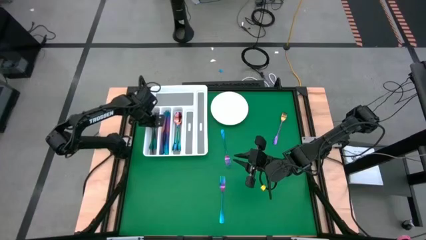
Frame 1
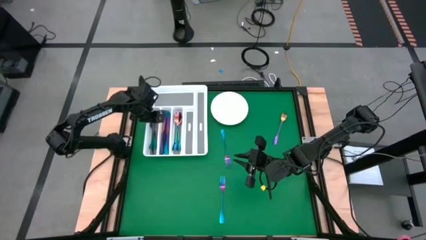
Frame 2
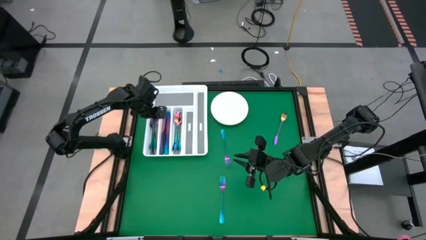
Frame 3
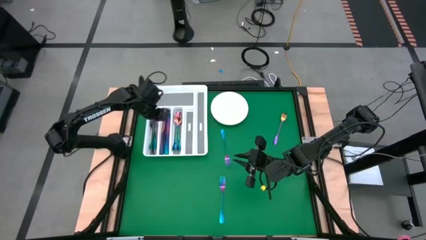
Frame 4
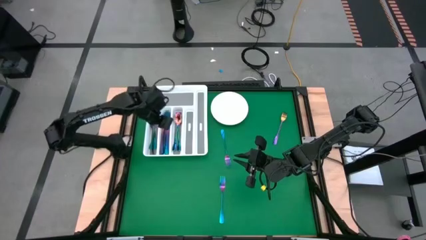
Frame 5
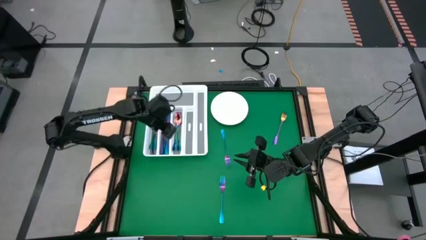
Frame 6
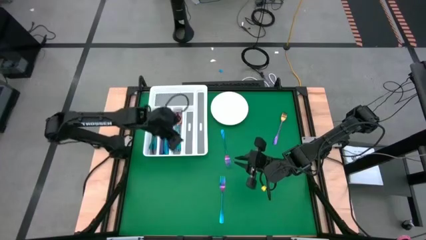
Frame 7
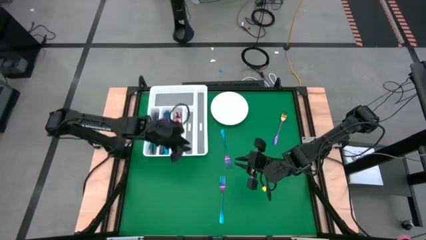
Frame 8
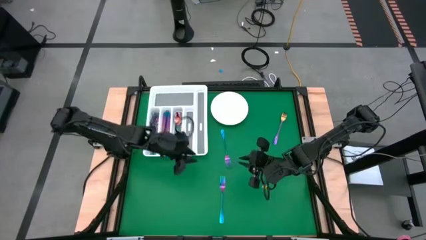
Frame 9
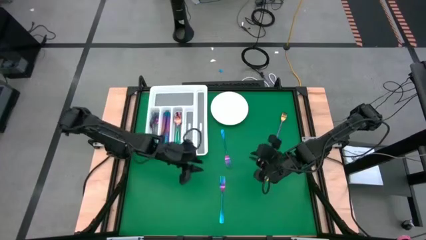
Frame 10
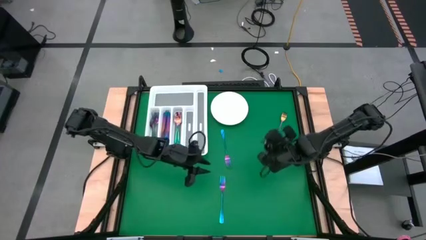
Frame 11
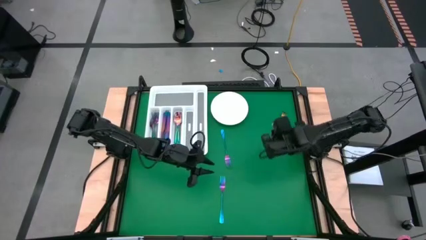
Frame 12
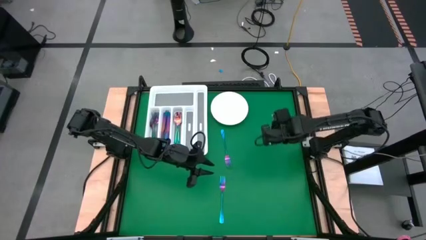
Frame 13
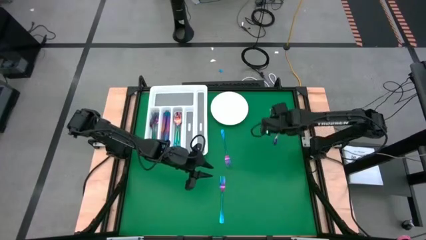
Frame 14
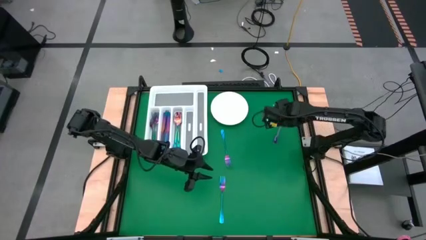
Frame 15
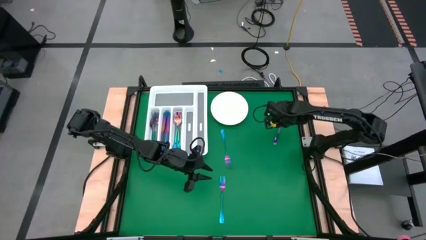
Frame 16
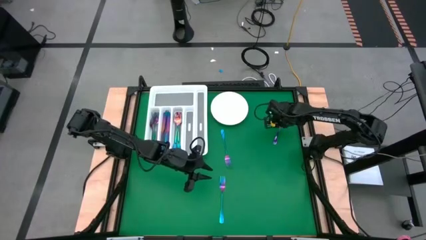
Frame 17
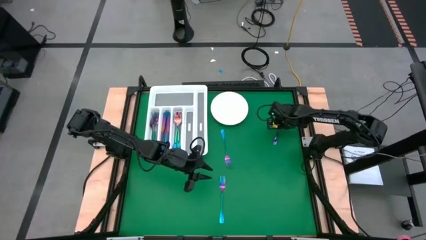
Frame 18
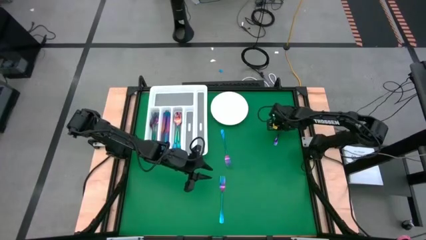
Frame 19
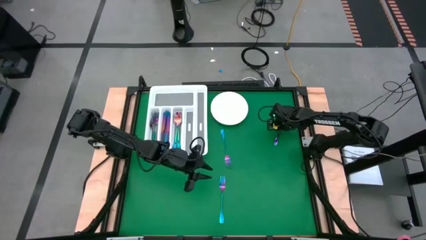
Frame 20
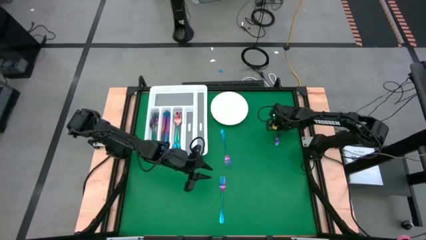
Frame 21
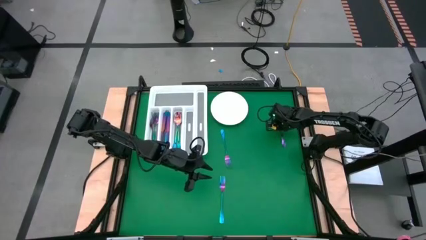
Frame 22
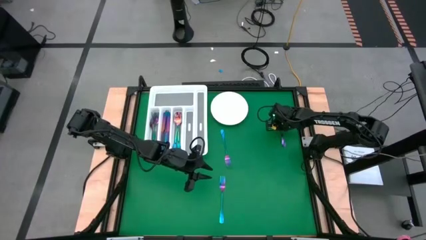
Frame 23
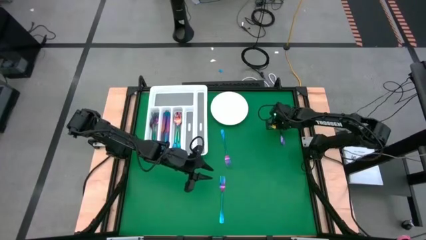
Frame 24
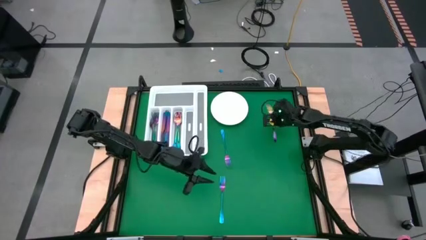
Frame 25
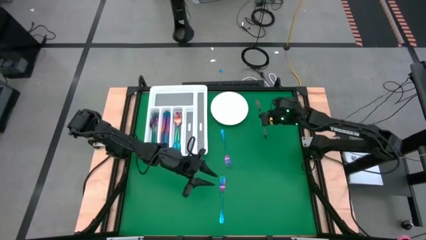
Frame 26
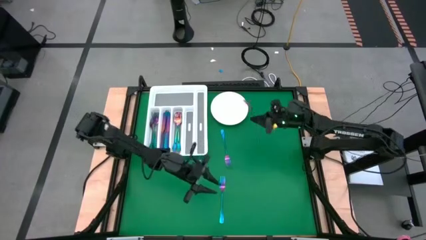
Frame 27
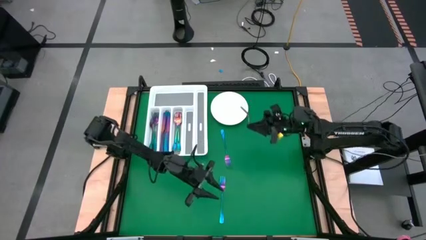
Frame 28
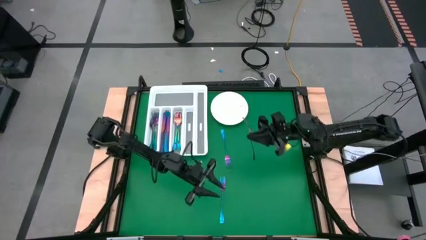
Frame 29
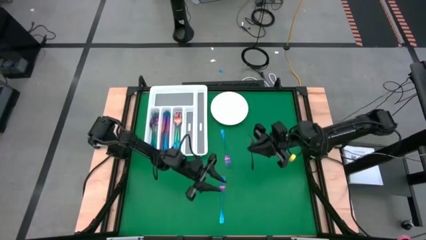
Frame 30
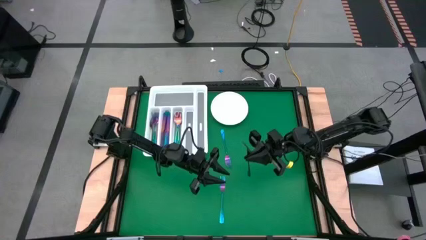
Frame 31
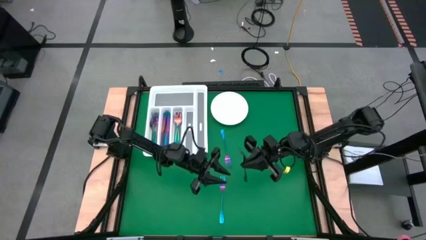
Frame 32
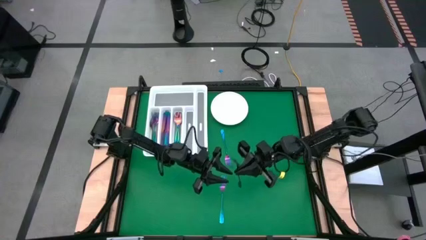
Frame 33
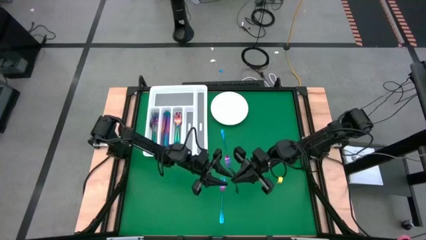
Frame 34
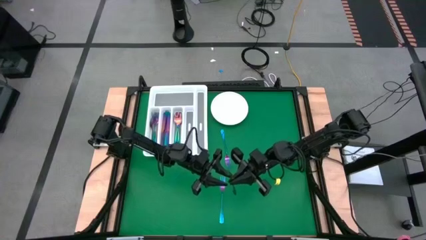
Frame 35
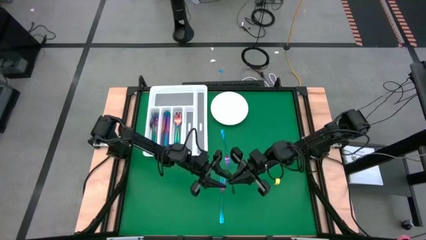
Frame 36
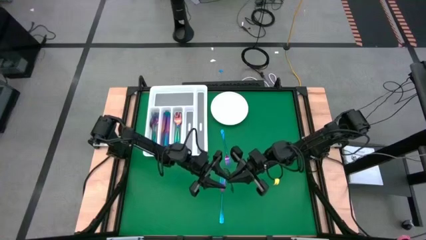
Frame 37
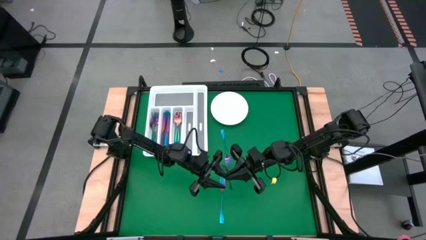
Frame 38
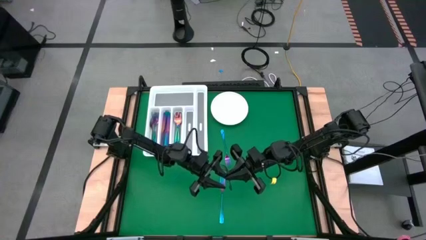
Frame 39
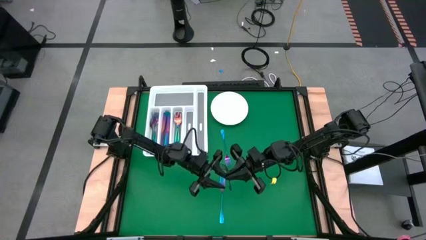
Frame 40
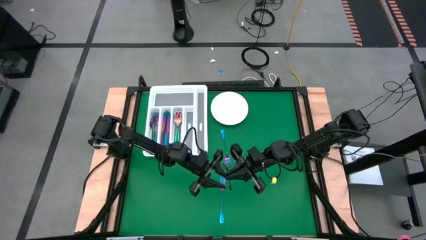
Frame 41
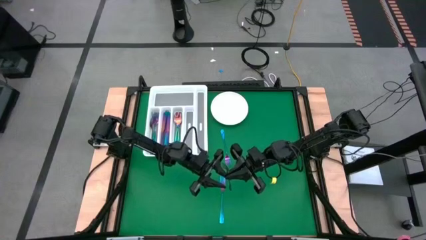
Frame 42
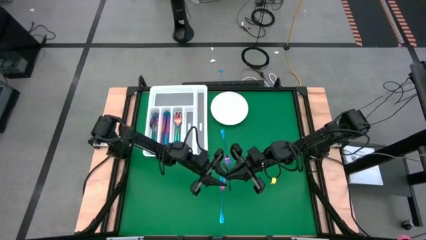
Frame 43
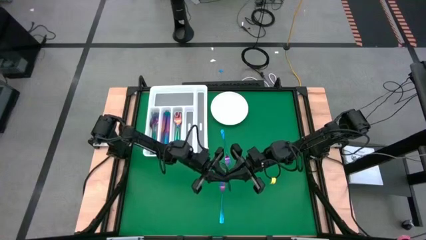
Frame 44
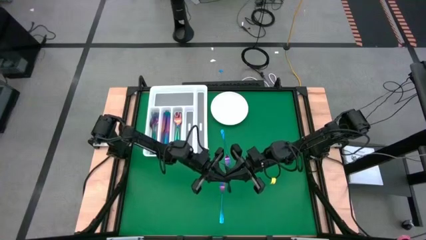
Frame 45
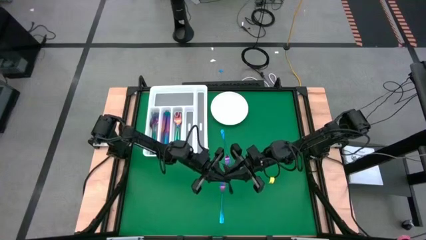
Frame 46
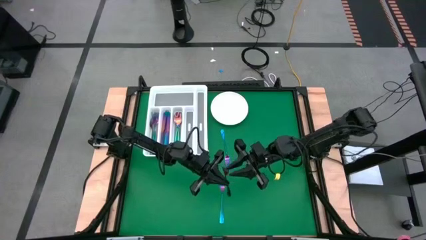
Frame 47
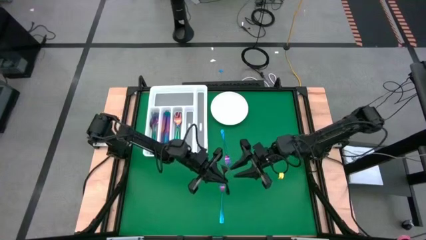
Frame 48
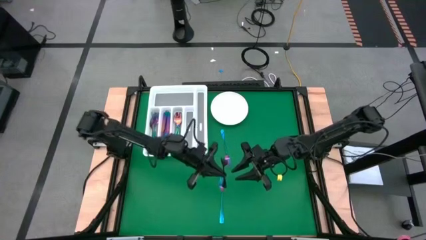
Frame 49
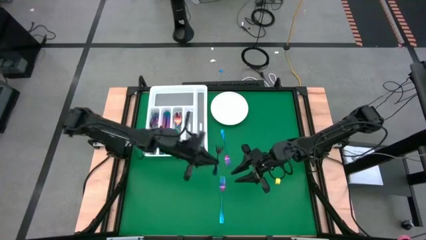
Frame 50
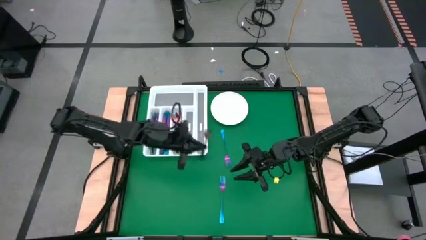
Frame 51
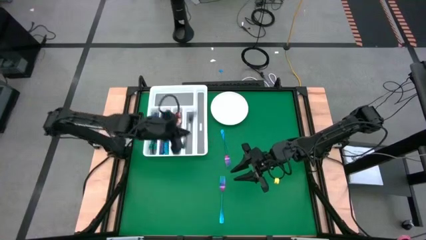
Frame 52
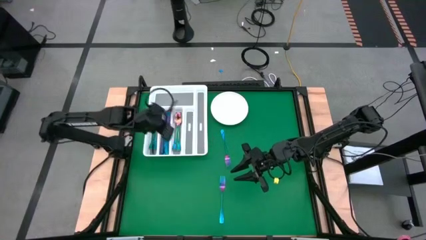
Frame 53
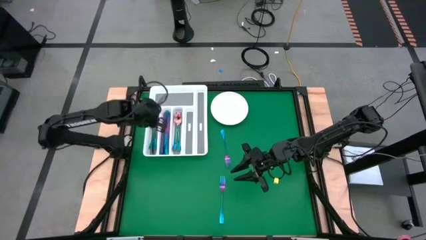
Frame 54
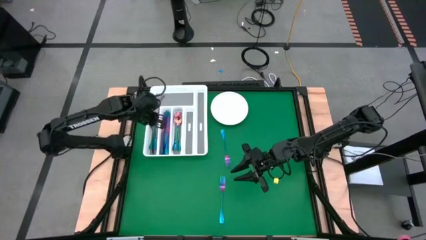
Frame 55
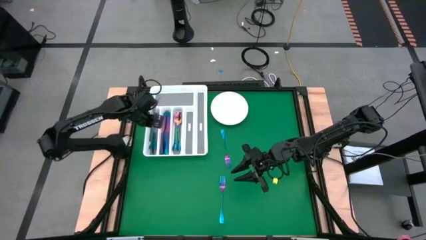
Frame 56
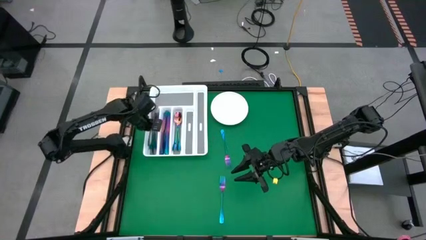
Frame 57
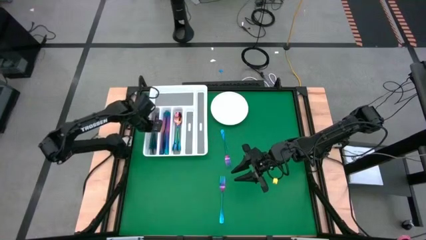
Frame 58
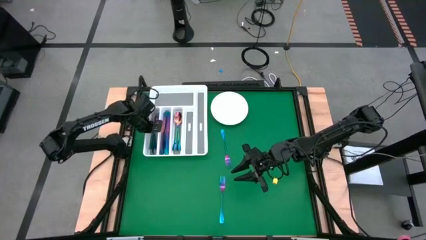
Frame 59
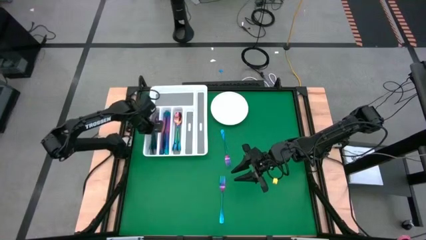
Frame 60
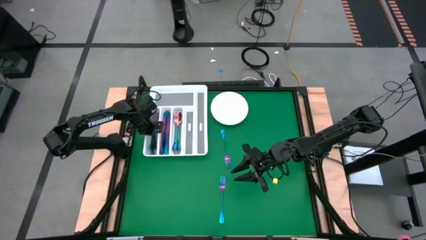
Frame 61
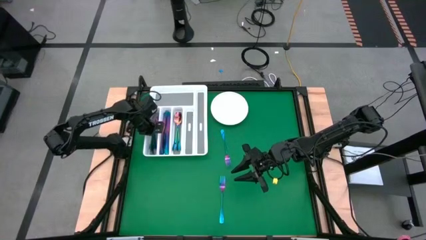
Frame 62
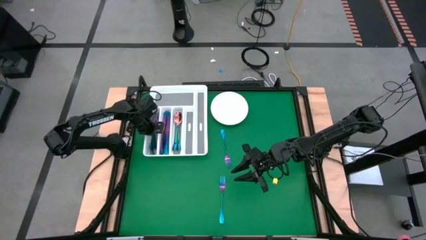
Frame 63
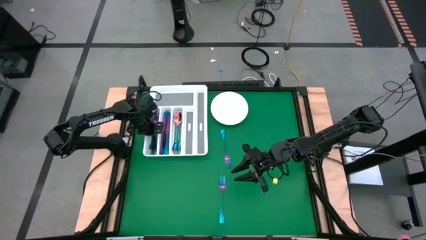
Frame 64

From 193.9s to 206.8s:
Task: Sort silverware
Put the blue fork into the silverware tray

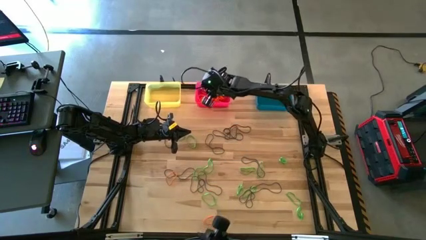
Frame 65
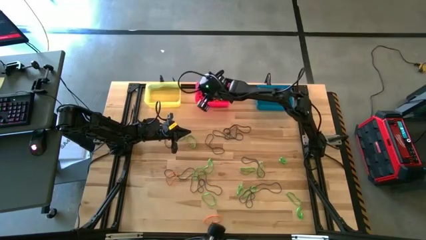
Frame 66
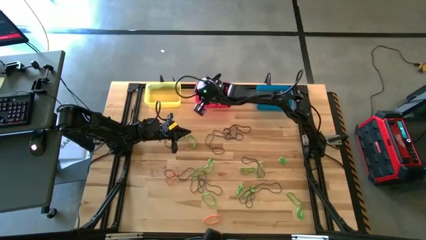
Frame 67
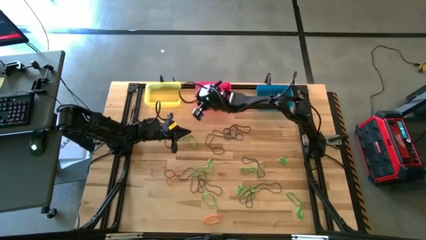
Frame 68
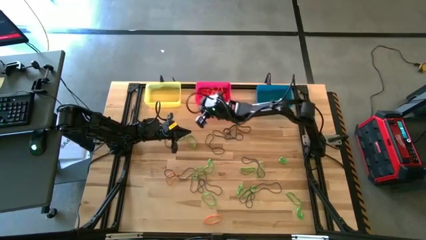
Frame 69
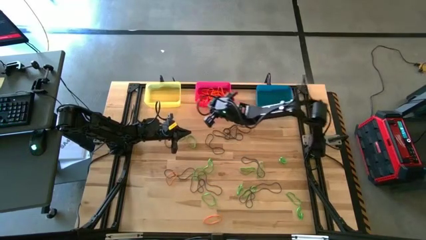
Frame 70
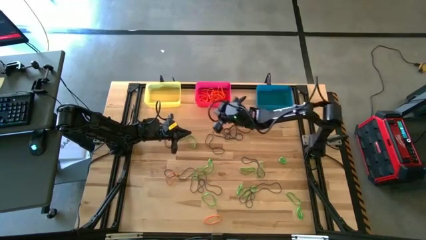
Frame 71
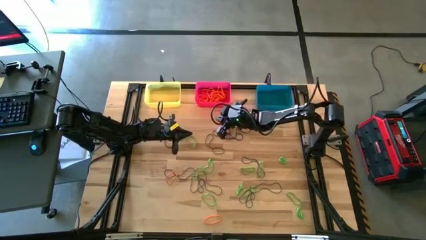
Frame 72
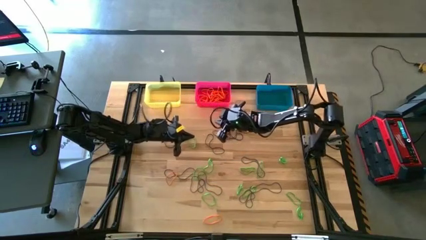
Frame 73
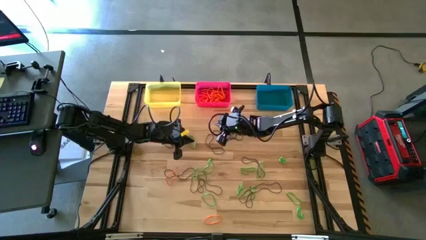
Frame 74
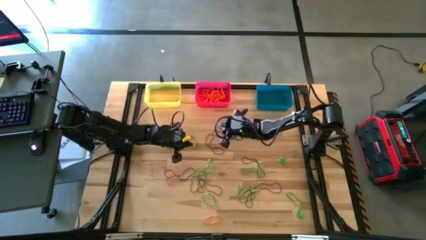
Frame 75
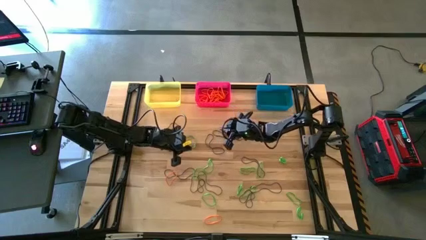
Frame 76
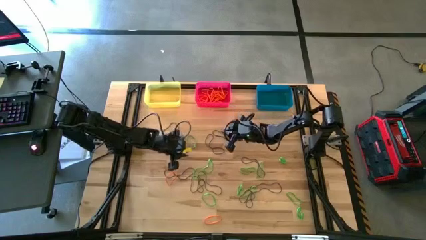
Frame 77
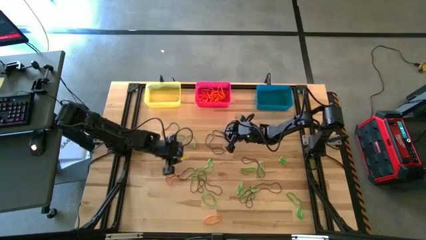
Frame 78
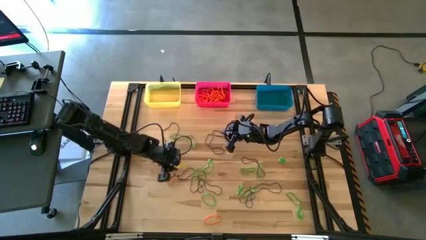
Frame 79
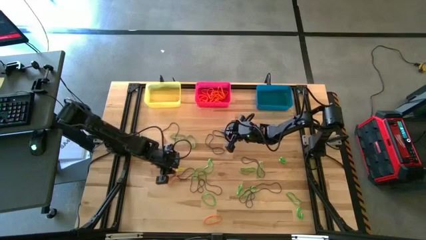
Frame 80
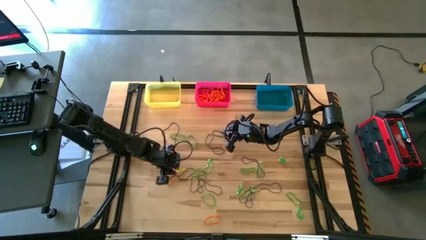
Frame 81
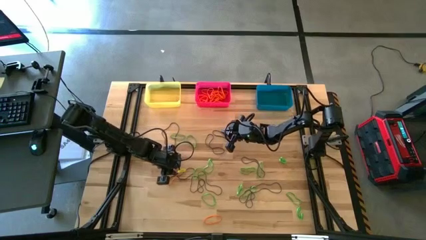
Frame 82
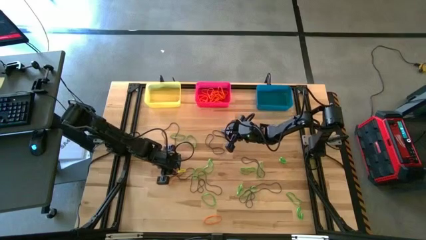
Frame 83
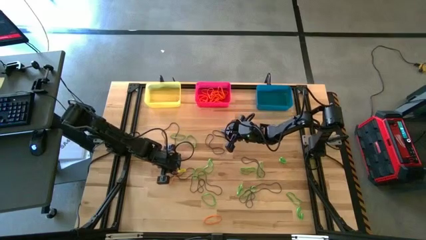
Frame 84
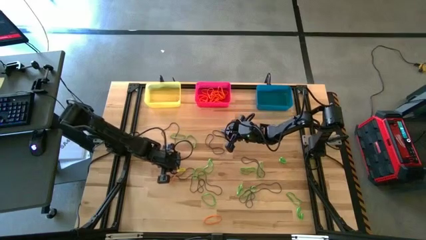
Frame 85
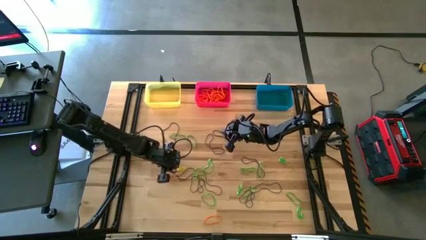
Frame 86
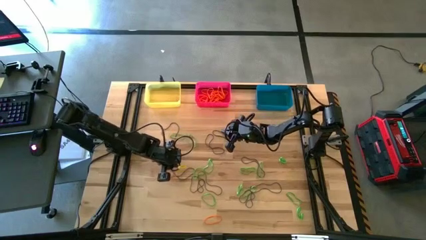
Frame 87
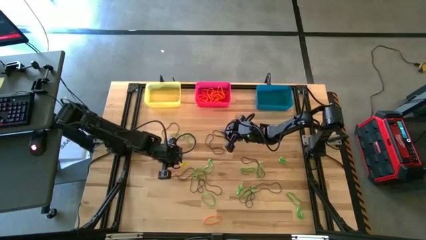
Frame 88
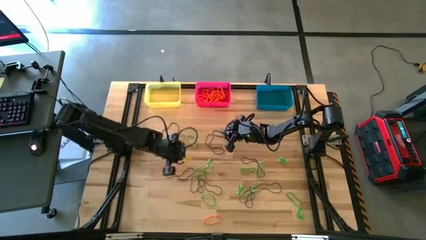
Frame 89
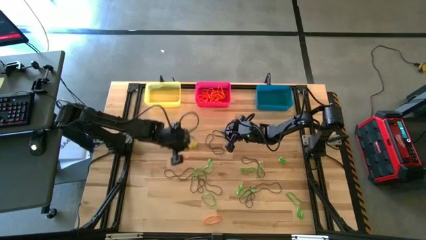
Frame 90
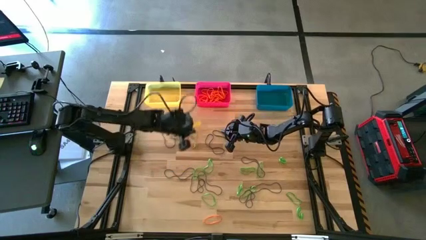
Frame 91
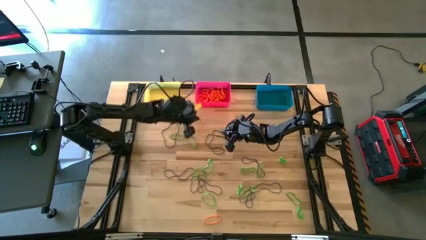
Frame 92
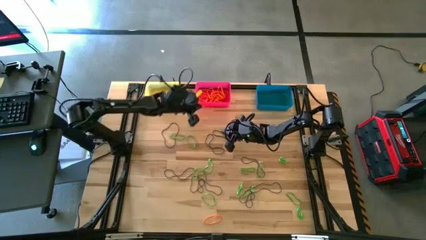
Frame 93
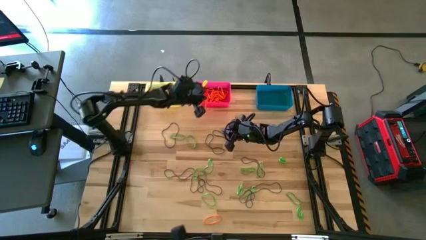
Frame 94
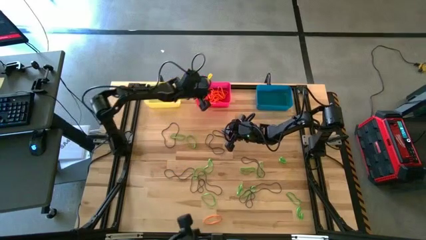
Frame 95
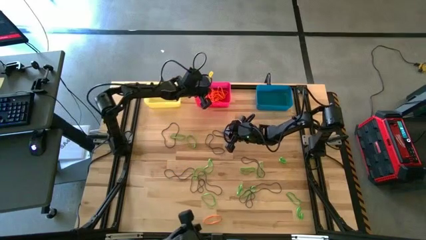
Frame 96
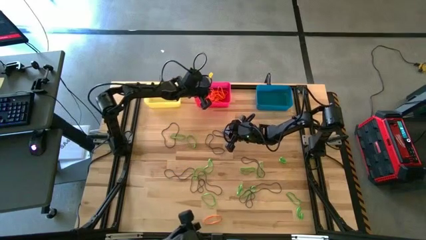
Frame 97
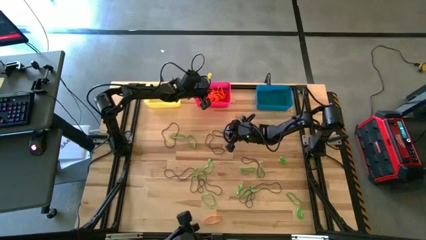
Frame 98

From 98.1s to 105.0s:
Task: Sort rubber bands into baskets
Put the orange rubber band into the pink bin
